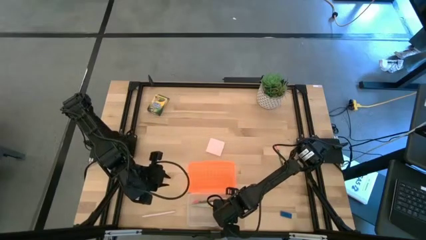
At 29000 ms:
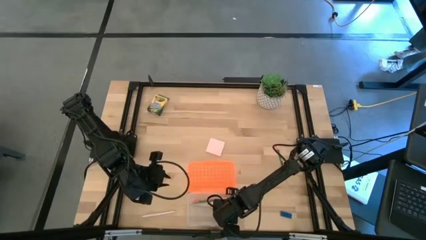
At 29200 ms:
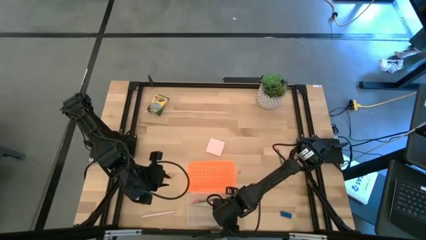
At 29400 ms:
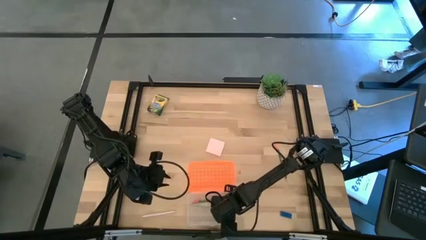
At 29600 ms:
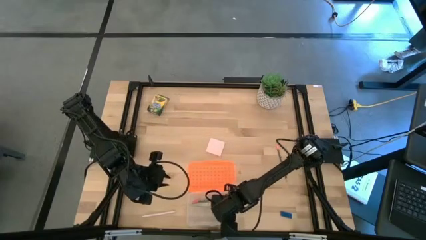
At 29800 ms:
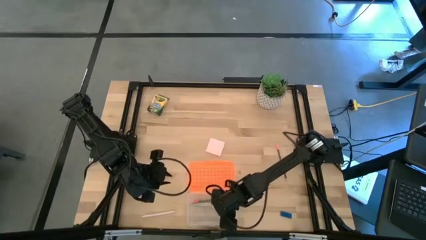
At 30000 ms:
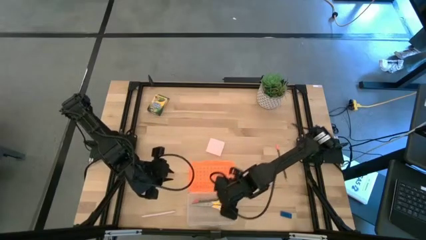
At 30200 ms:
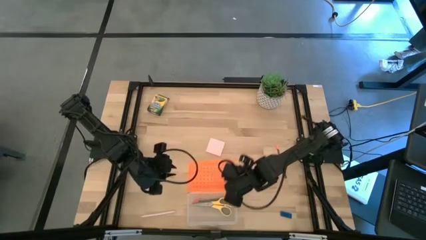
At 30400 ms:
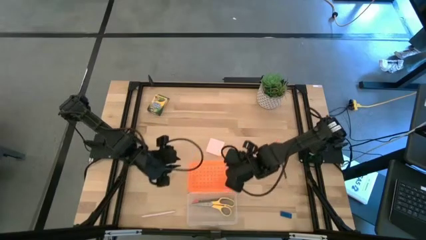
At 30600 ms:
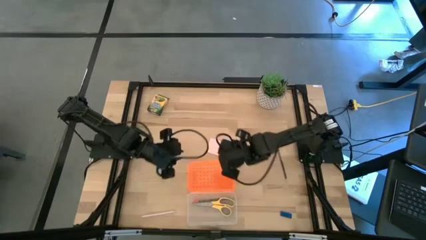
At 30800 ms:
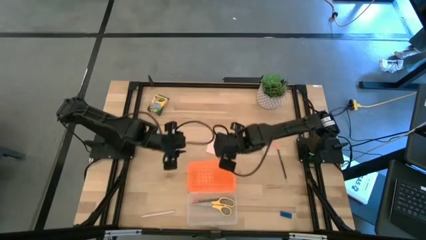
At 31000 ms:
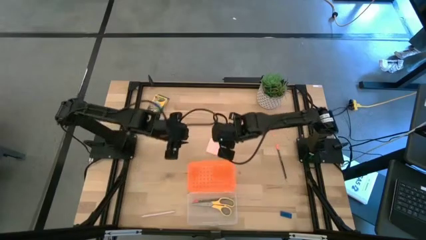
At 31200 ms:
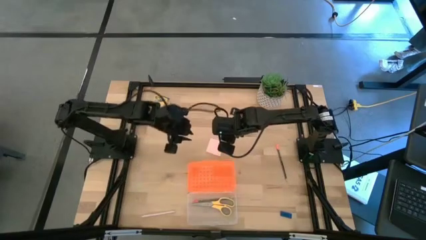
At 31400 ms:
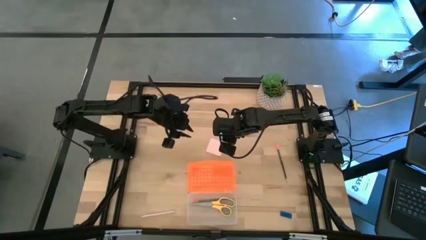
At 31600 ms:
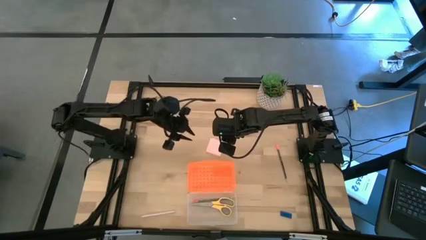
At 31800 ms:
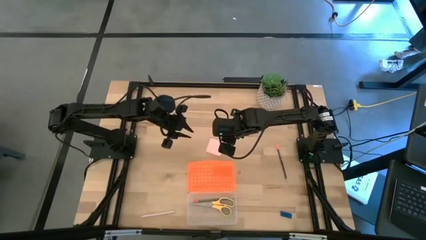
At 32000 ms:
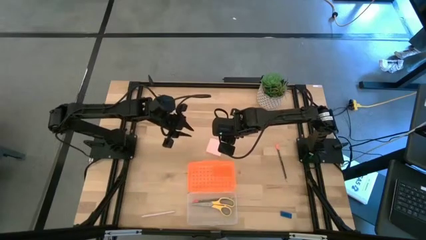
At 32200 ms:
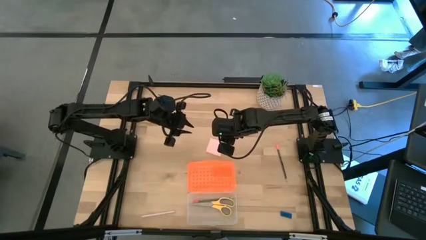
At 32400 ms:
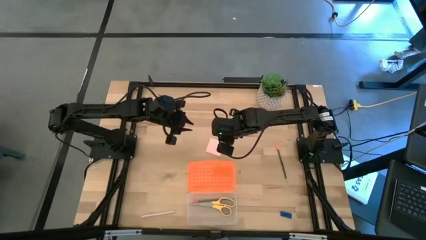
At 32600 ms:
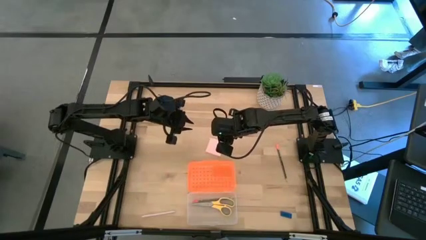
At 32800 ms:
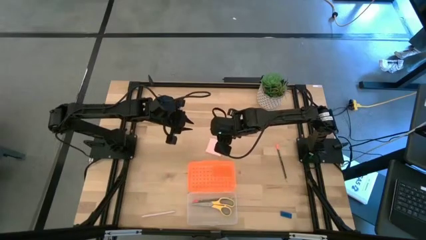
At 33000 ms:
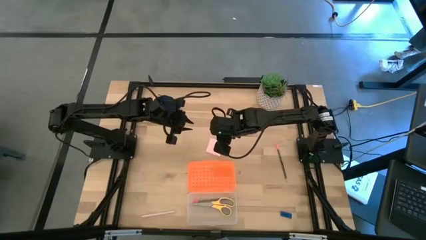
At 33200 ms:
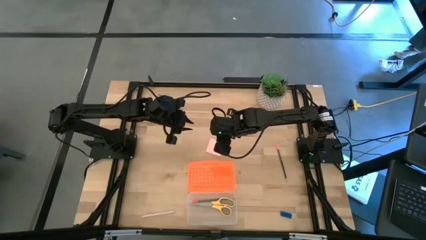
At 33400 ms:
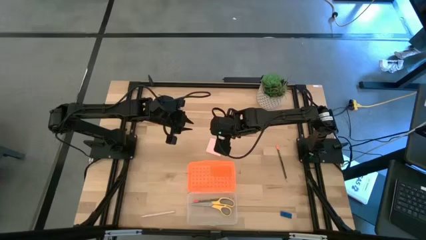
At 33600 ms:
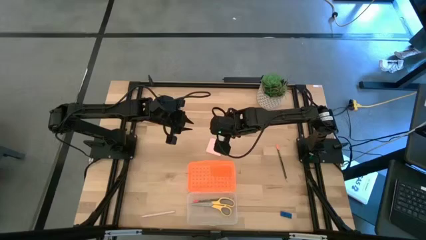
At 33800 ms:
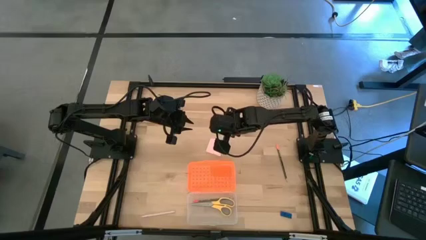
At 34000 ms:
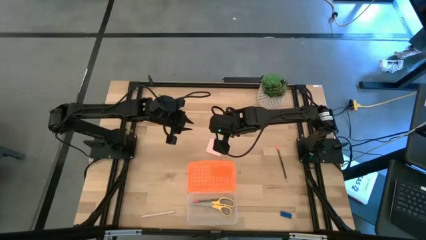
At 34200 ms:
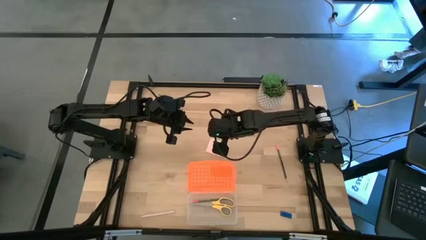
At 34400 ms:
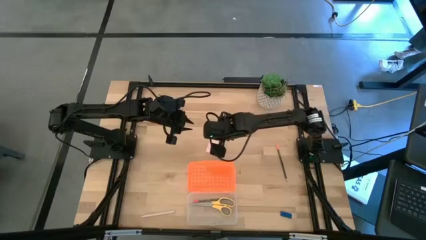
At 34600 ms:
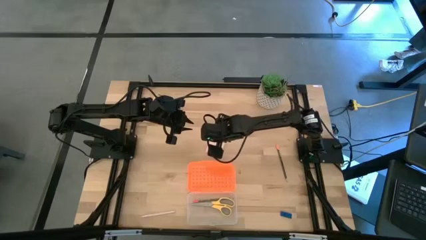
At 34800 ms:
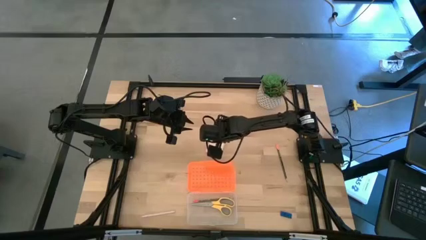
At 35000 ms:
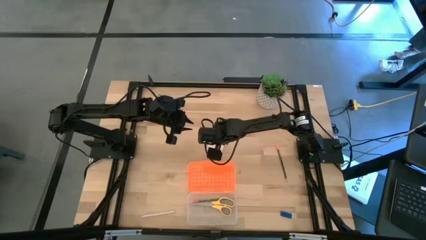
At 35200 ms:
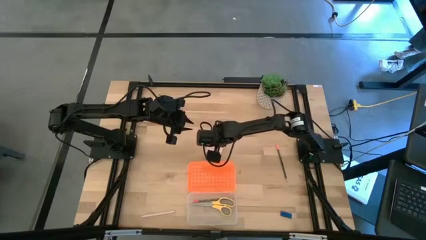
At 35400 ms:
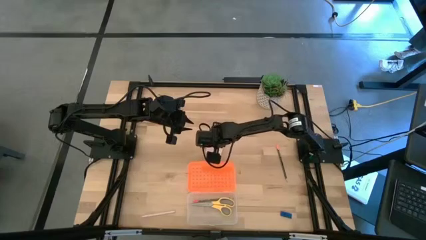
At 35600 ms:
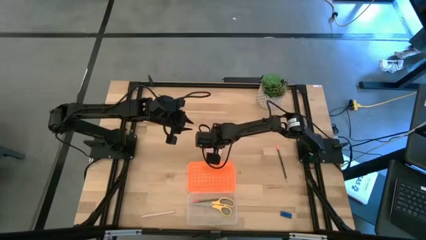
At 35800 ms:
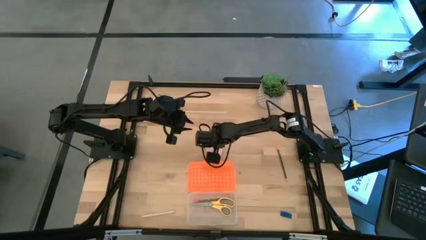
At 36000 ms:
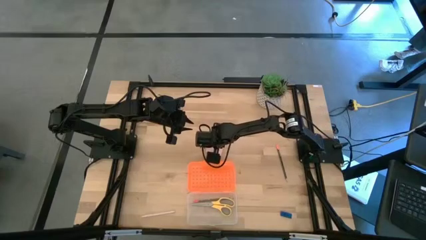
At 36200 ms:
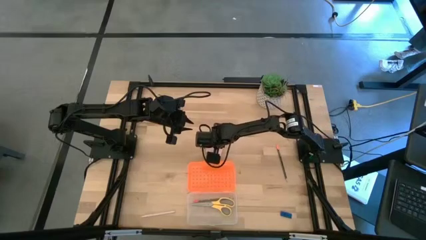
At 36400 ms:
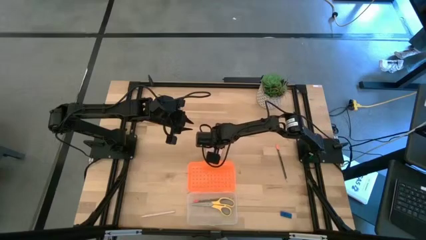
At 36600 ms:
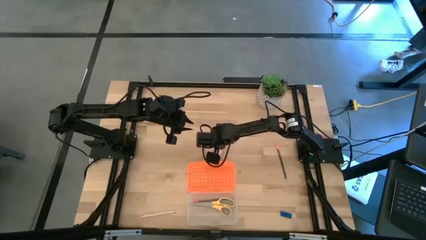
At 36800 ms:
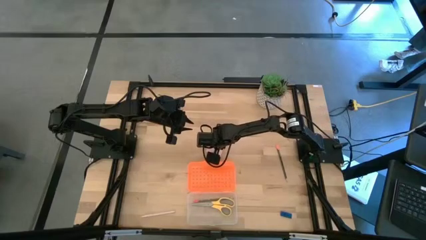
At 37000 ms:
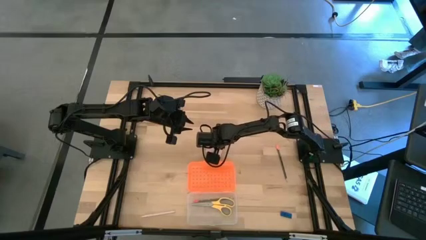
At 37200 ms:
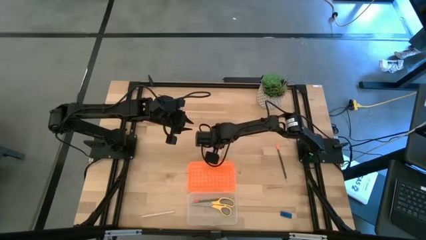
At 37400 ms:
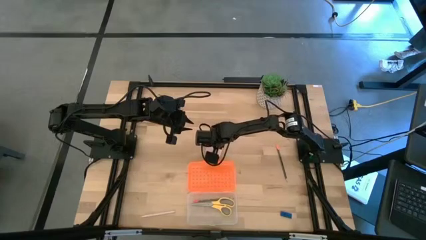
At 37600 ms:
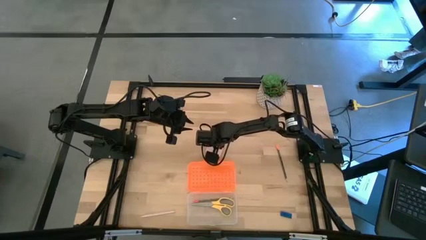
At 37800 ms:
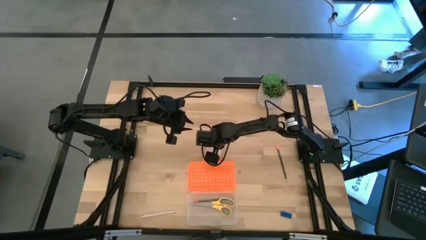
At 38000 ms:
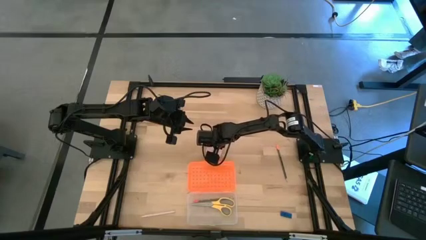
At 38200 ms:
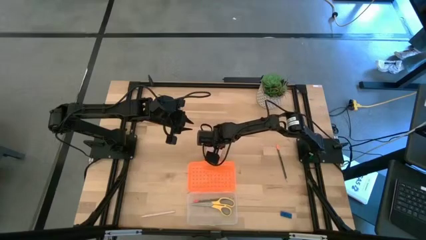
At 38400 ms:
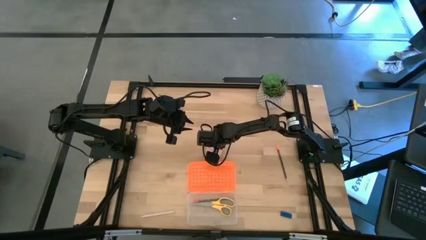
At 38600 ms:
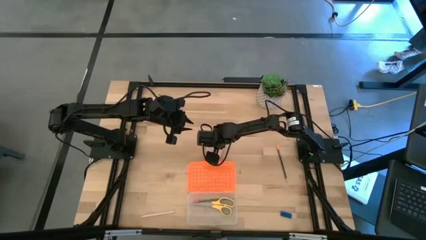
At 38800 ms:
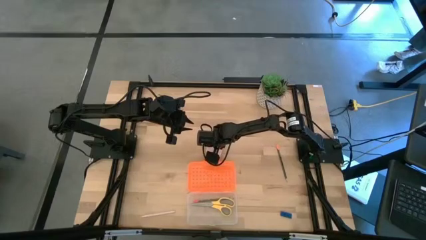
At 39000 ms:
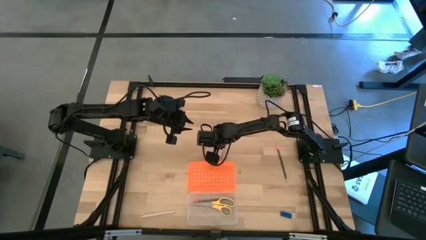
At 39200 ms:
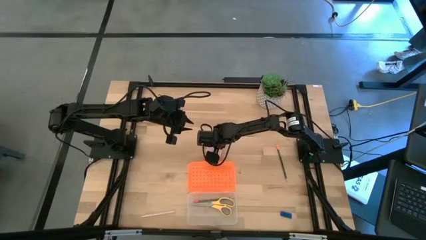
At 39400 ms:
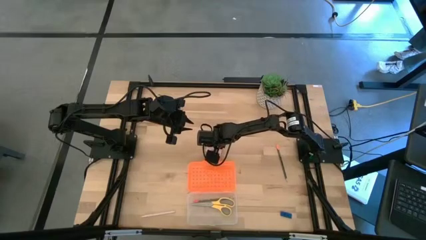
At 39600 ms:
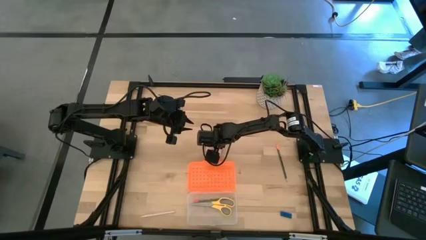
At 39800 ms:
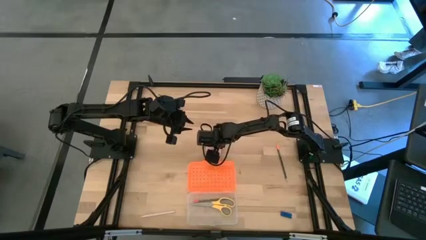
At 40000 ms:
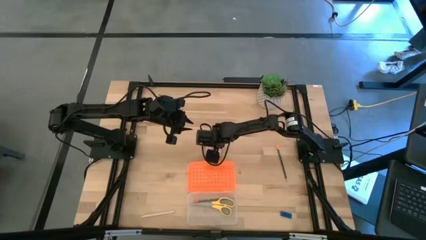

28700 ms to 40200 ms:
Task: Pack school essentials
Put the notepad into the supply box

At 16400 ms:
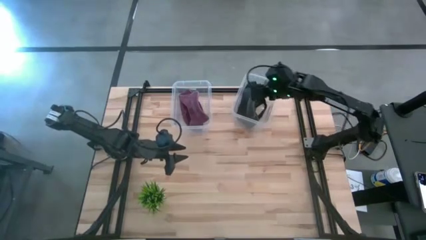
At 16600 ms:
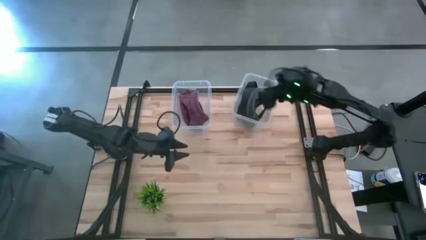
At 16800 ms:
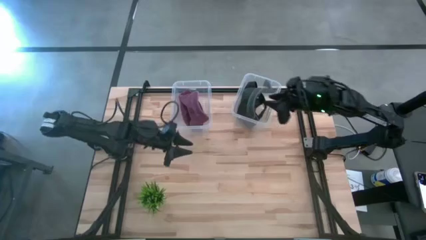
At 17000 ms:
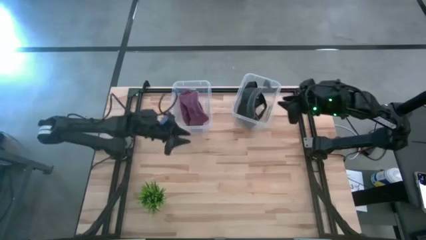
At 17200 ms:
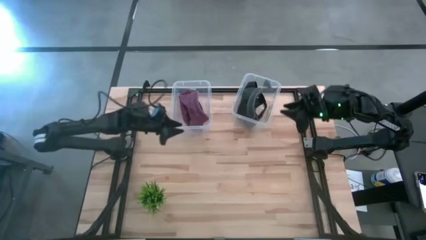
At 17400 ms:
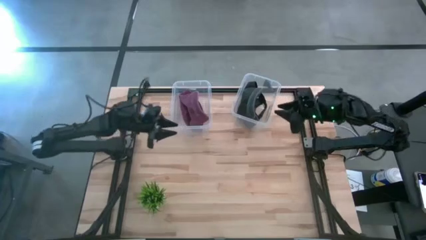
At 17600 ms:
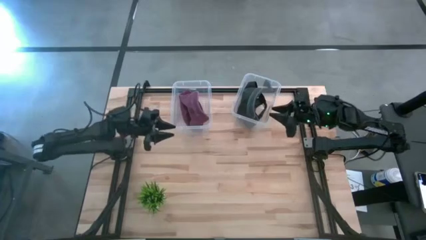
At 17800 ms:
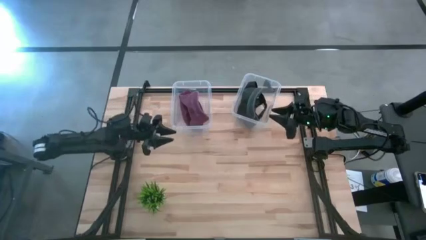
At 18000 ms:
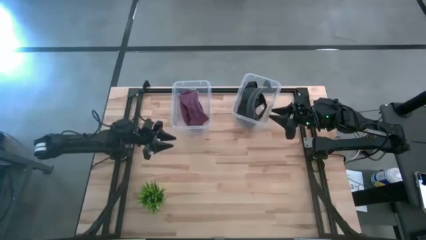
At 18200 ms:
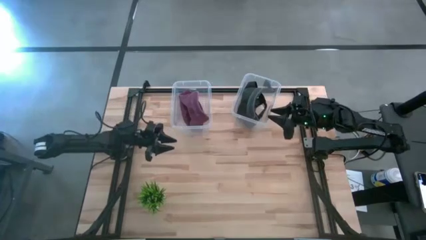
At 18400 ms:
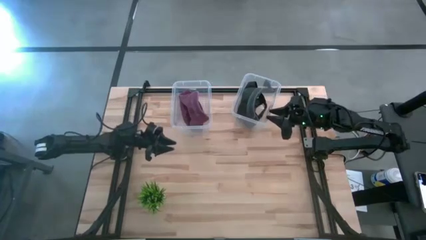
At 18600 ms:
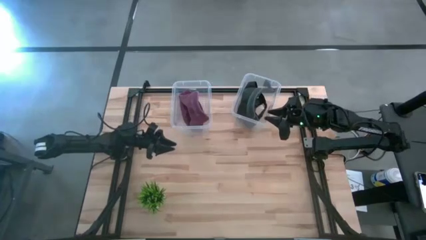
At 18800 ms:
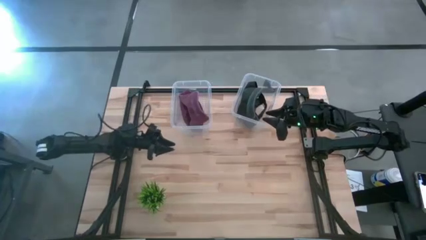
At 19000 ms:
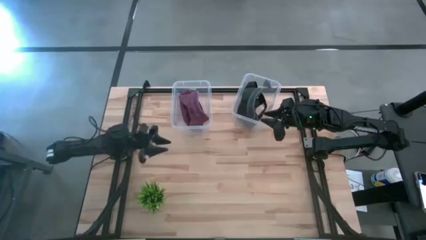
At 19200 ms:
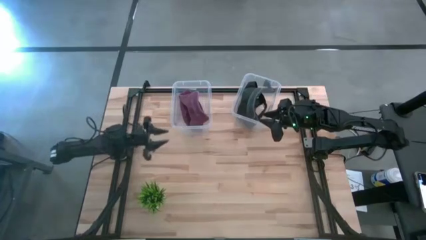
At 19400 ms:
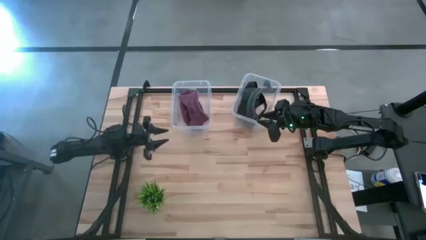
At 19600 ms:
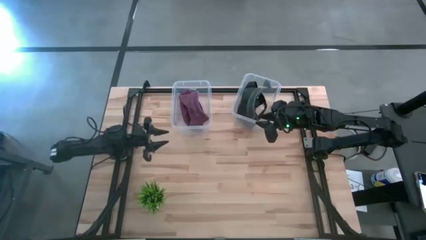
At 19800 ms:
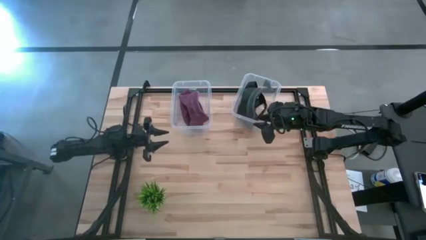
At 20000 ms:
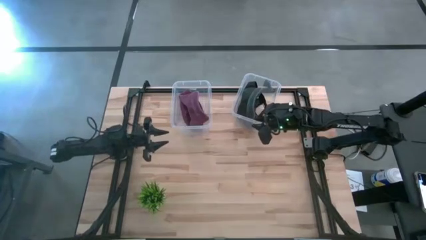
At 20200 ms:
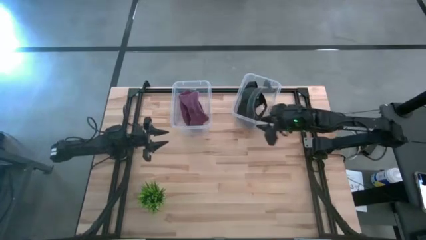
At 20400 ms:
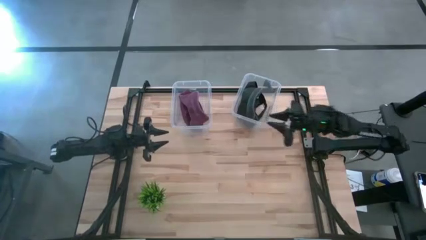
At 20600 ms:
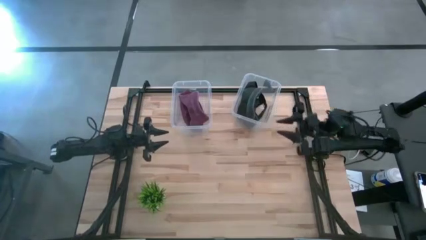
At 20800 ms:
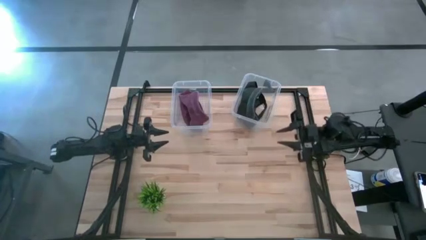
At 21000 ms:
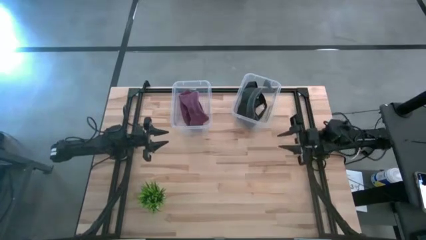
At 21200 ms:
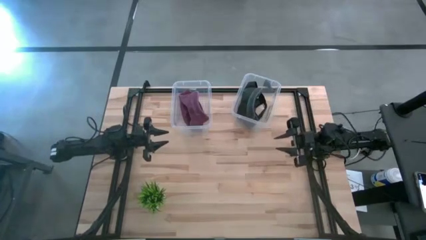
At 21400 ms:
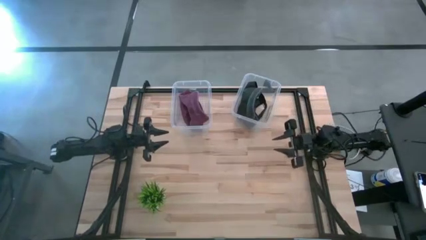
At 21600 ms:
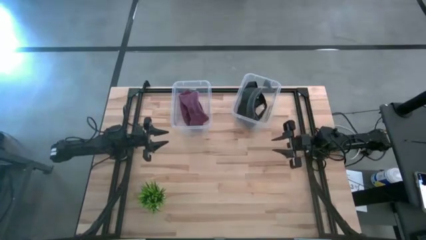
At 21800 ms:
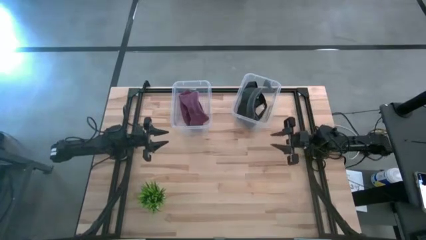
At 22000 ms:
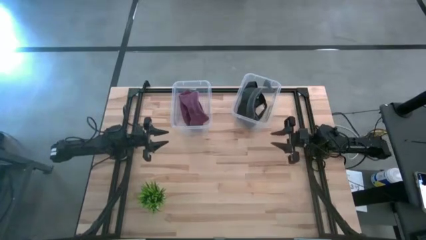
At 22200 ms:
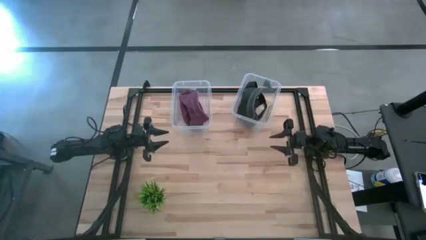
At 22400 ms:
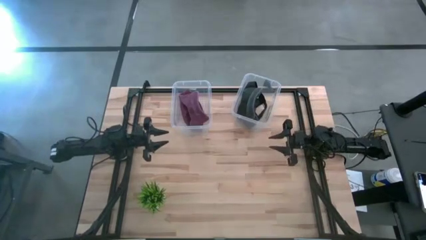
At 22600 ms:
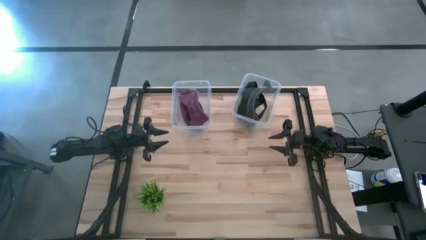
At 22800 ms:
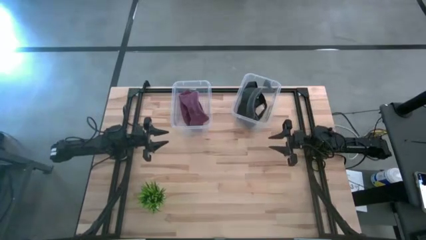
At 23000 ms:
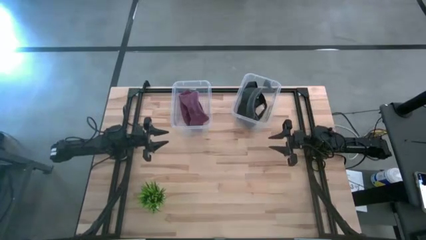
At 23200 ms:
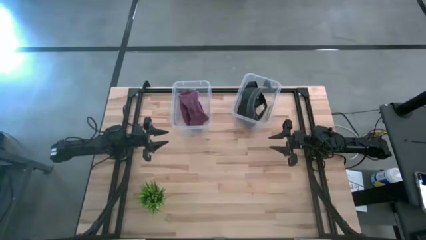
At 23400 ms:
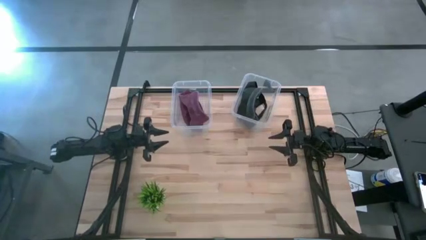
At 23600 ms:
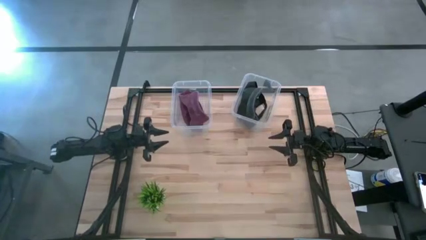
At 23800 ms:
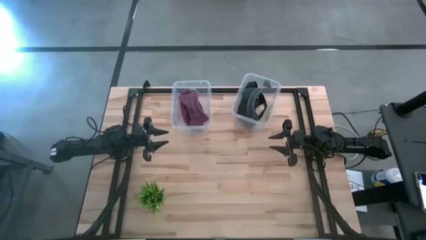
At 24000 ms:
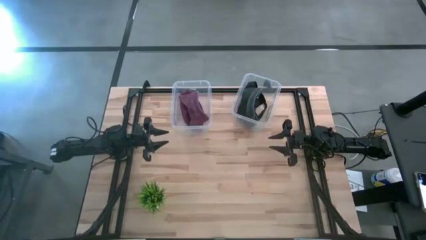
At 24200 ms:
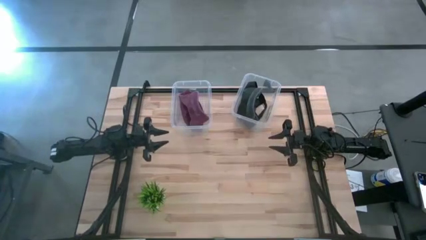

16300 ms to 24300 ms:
Task: Pick & Place hat
Return to Home Position
